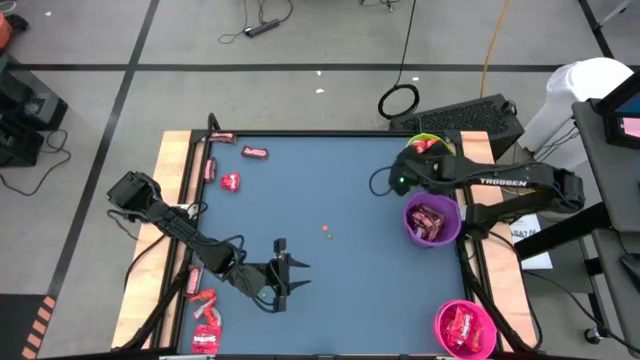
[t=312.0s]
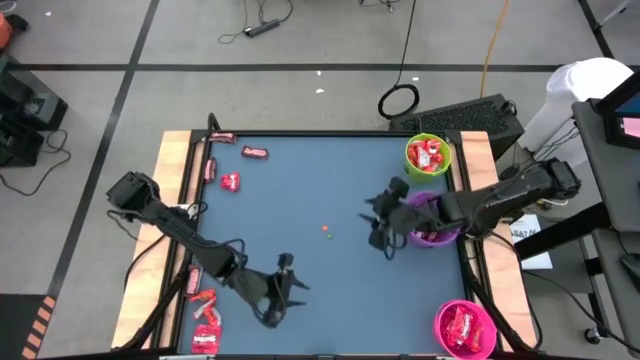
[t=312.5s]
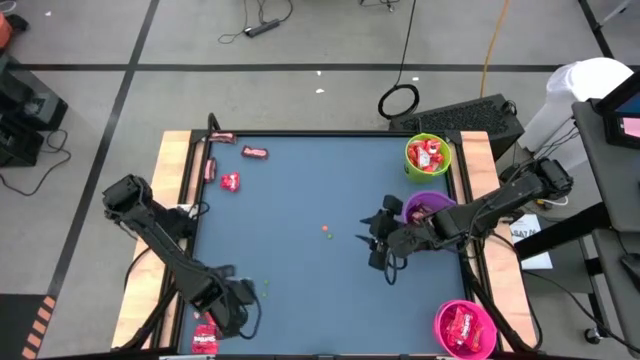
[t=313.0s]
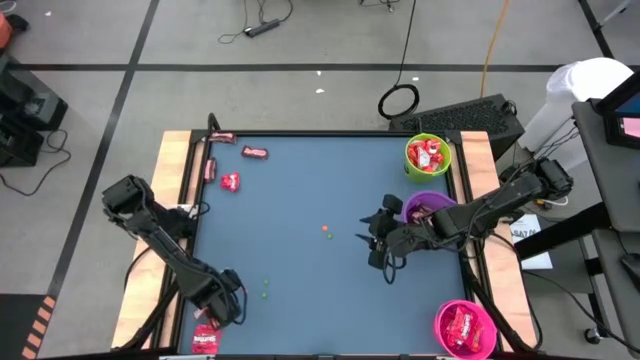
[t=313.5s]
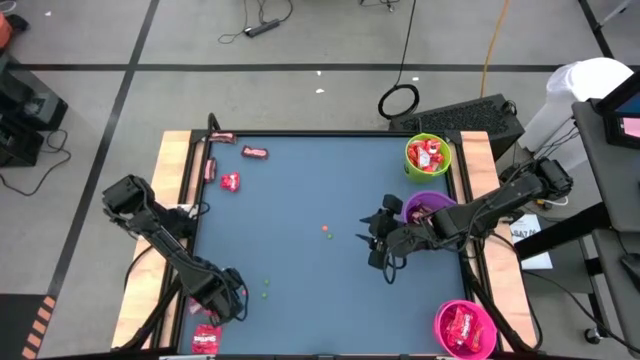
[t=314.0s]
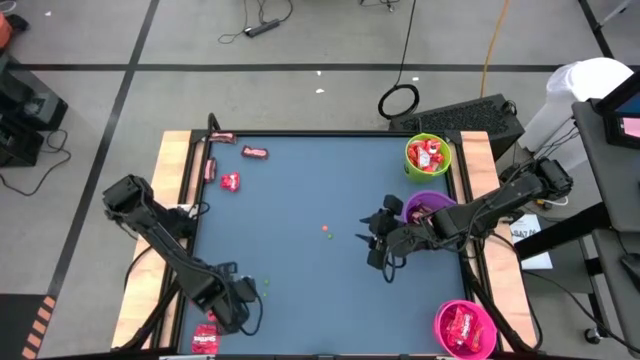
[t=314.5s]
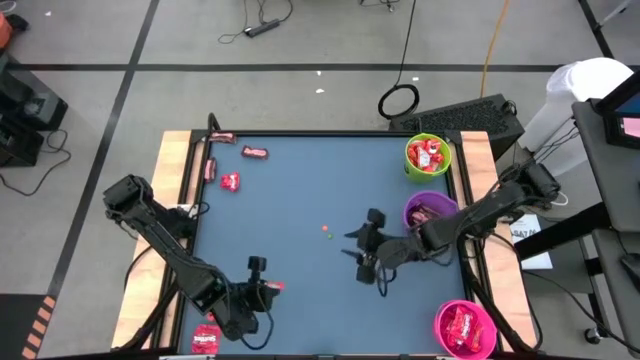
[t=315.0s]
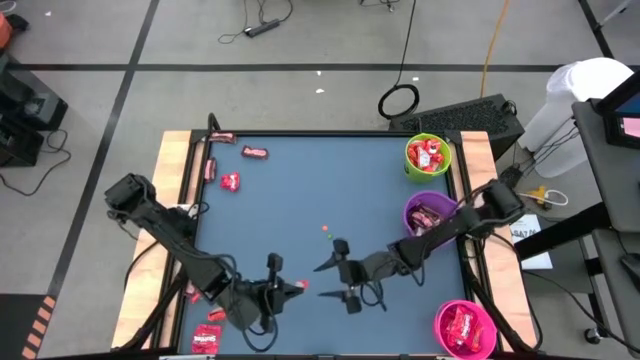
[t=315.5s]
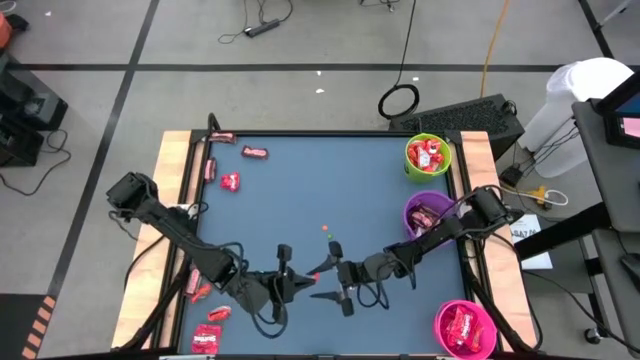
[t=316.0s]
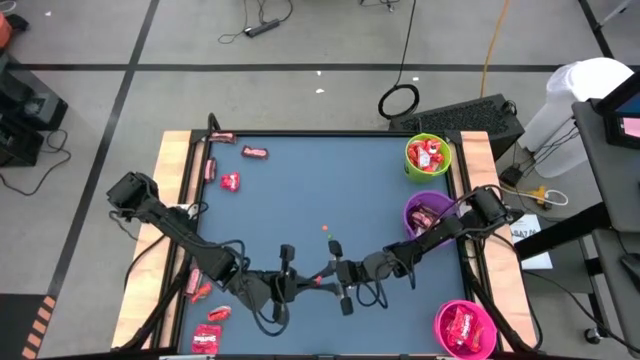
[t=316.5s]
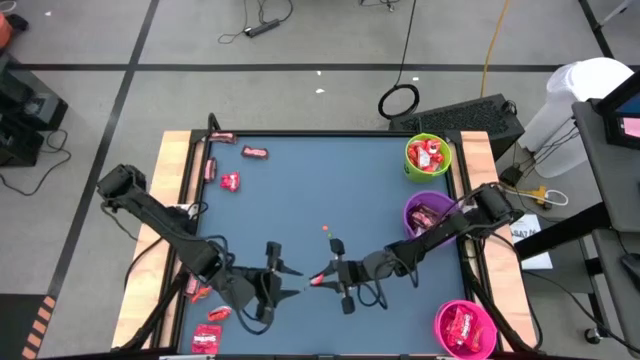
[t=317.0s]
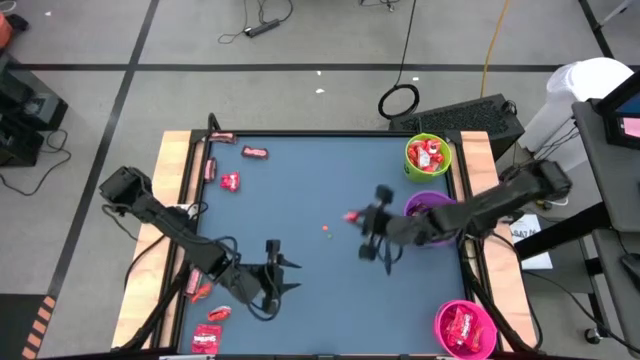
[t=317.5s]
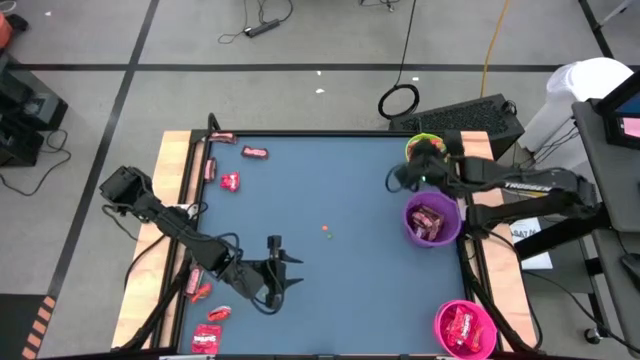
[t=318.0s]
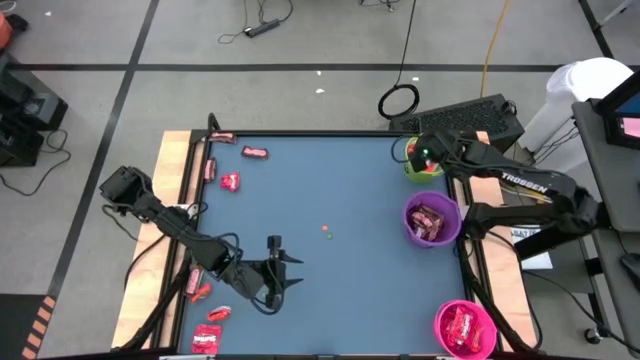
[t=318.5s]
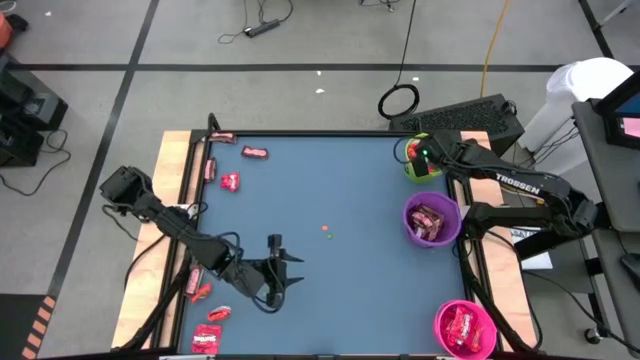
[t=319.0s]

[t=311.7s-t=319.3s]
Task: Organize candy in baskets
Put the orange chocolate bar into the green bucket

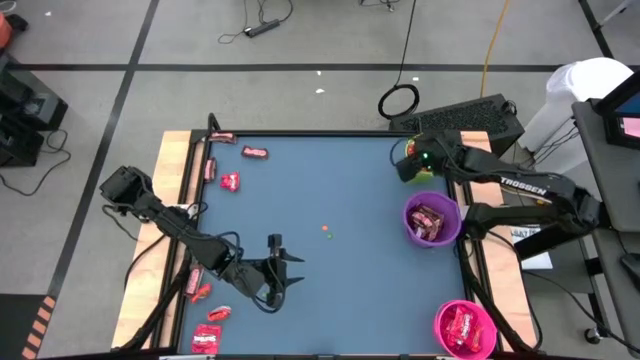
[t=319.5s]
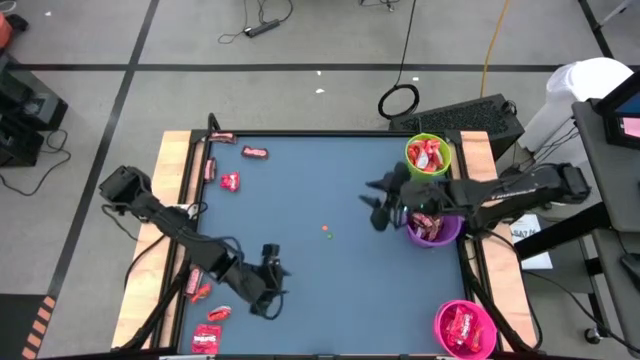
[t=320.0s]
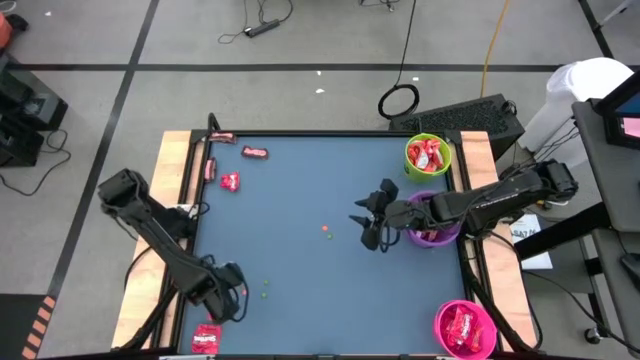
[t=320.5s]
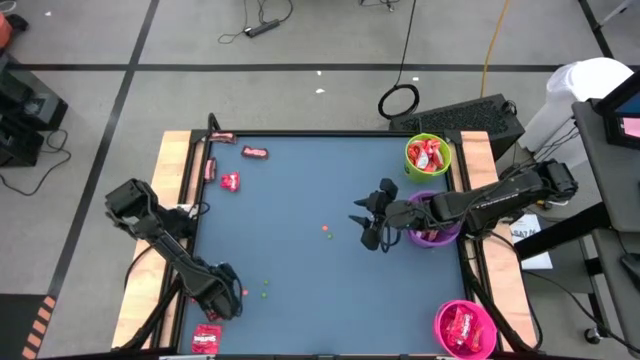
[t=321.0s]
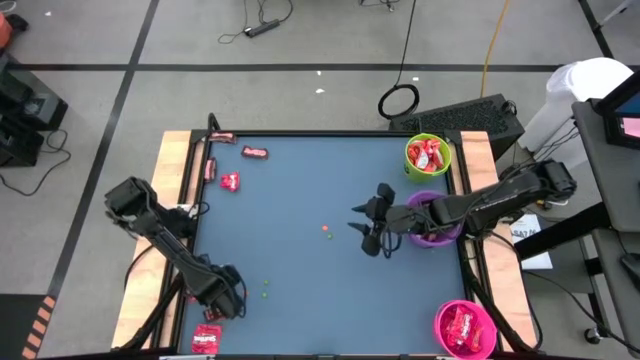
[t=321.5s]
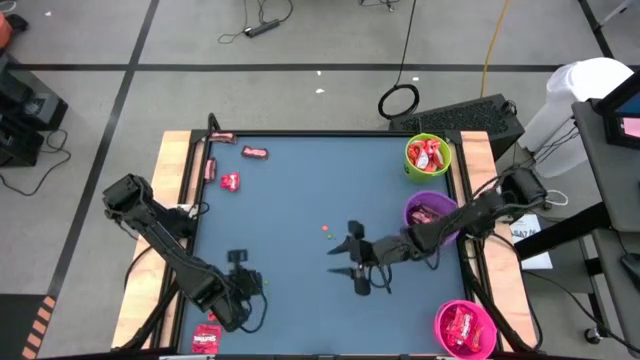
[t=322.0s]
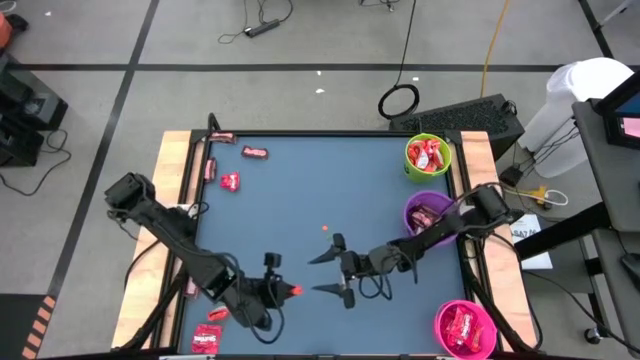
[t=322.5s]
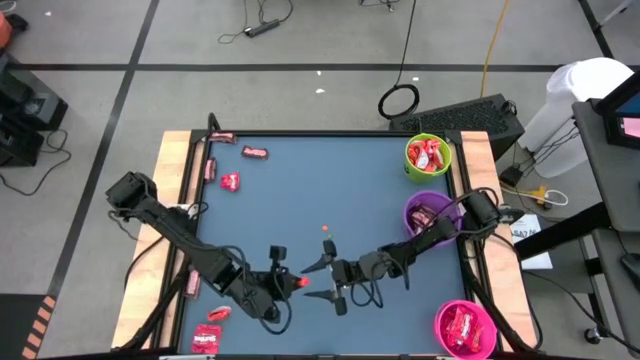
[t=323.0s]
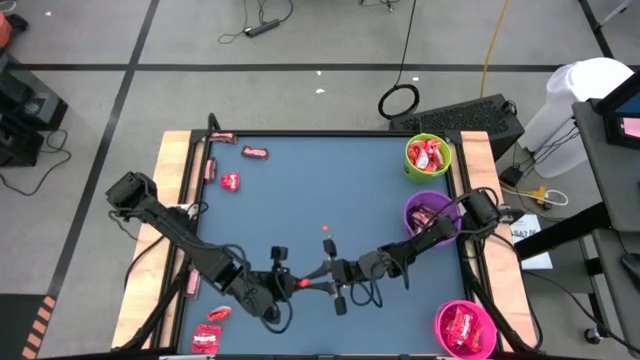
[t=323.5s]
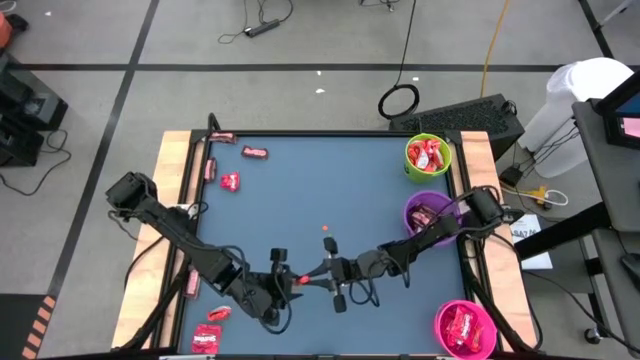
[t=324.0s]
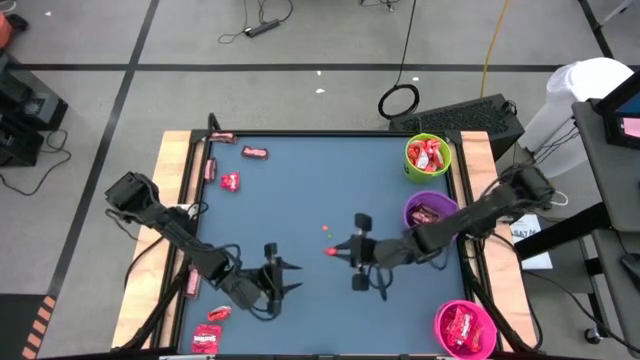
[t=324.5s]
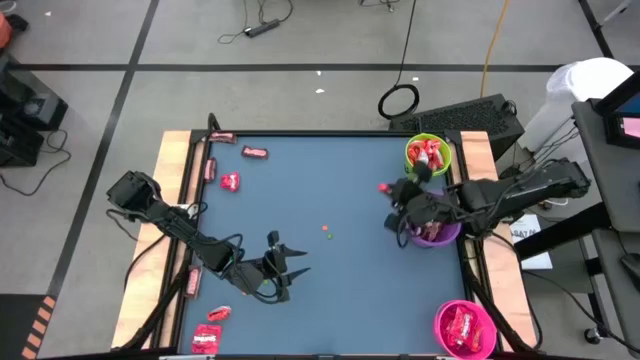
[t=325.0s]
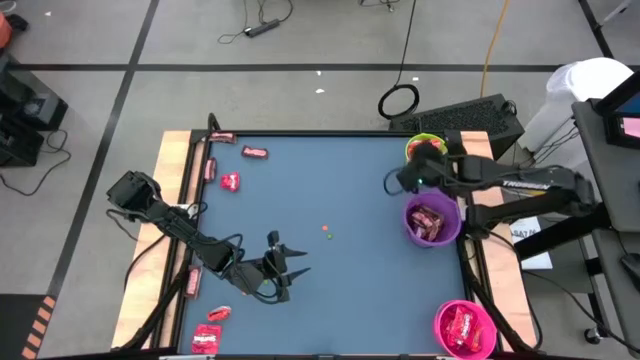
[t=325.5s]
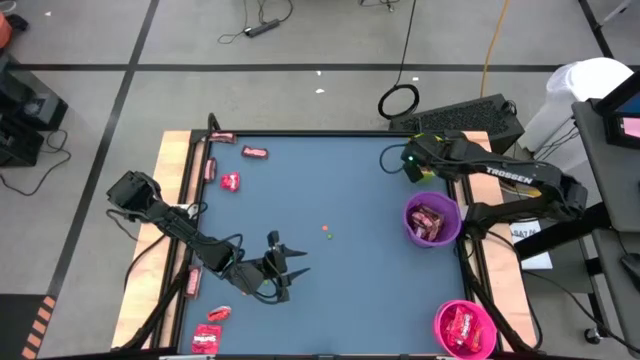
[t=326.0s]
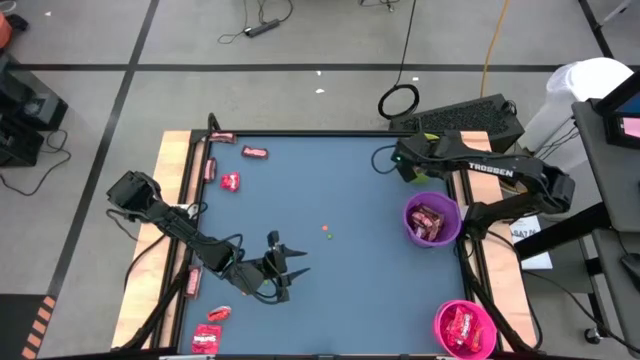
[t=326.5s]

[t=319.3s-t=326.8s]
Put the orange chocolate bar into the green bucket

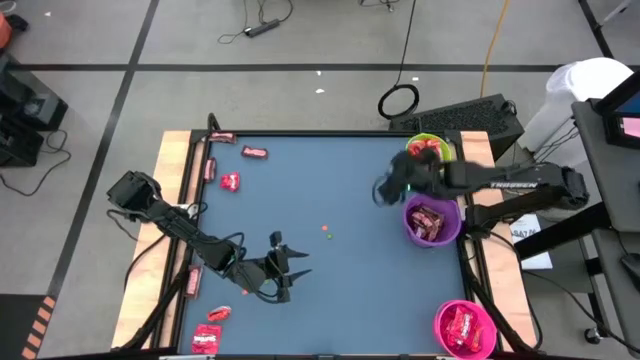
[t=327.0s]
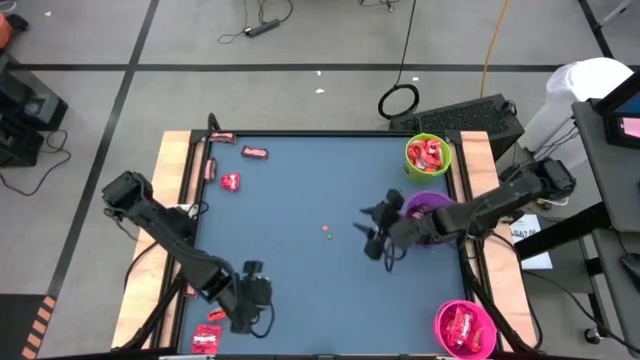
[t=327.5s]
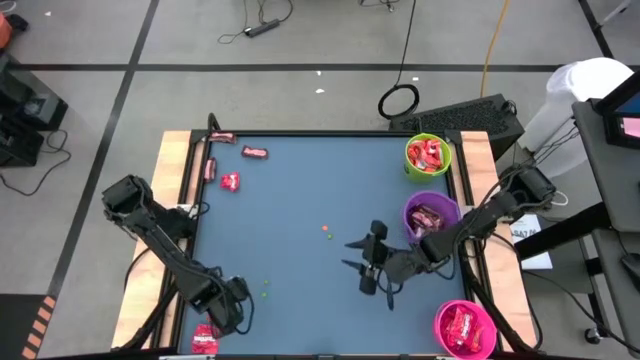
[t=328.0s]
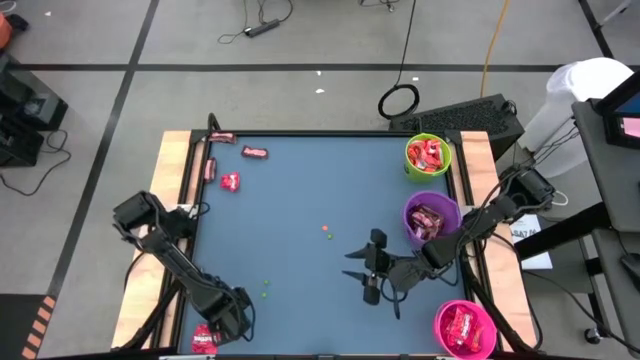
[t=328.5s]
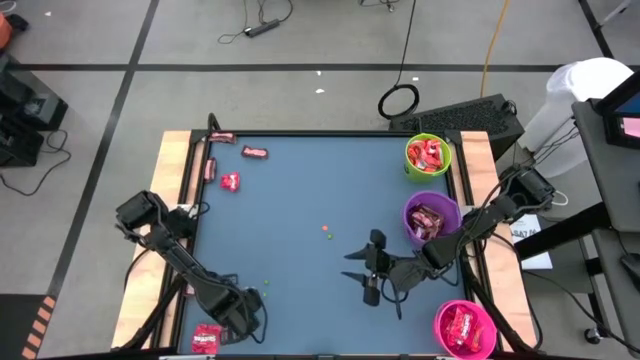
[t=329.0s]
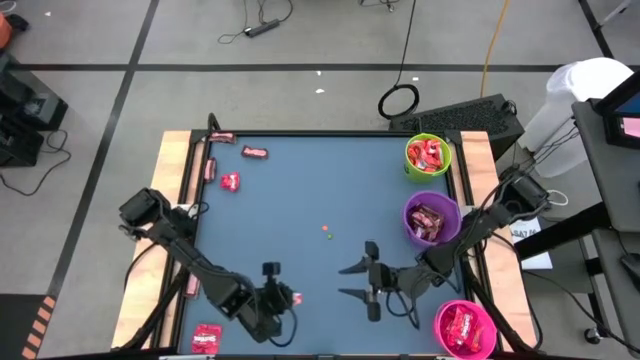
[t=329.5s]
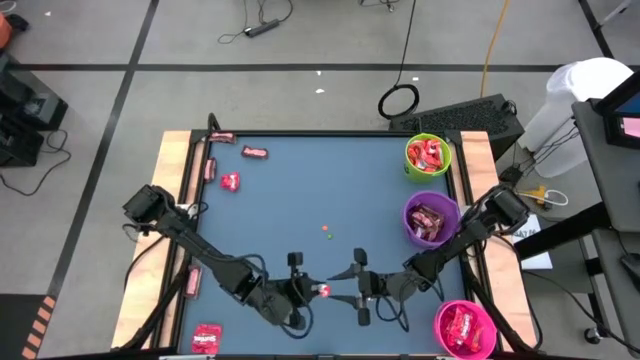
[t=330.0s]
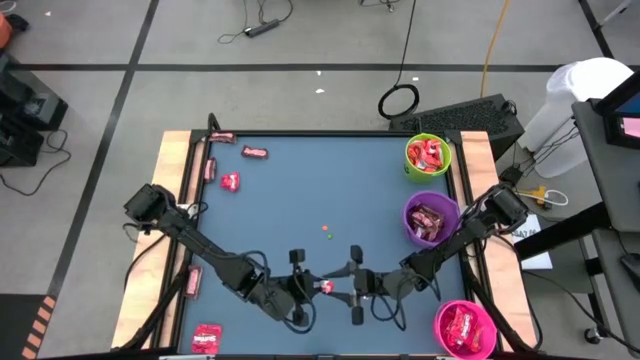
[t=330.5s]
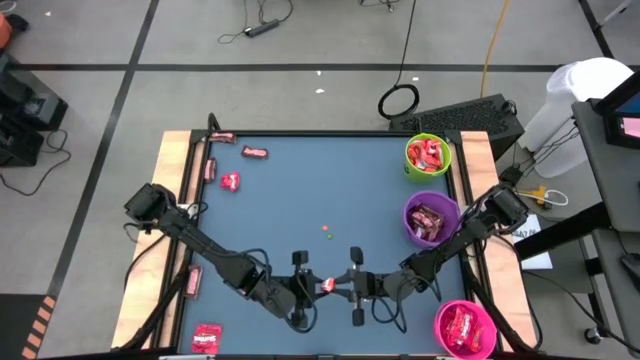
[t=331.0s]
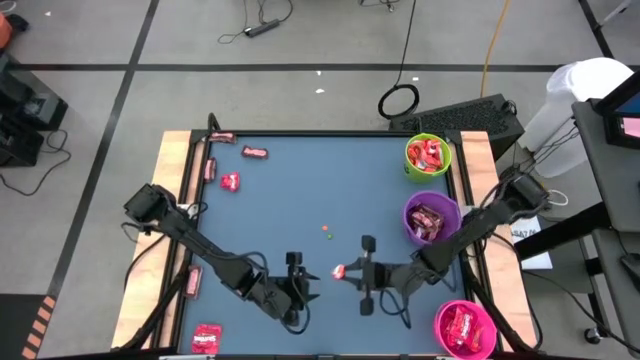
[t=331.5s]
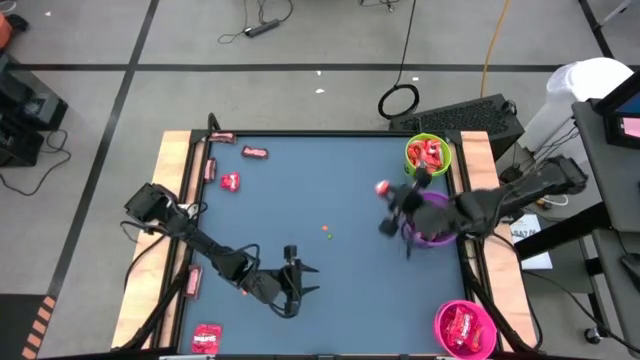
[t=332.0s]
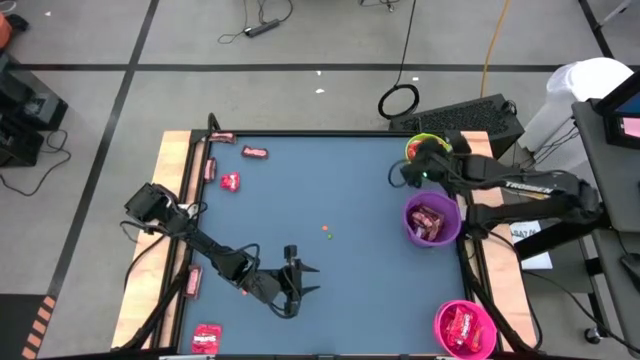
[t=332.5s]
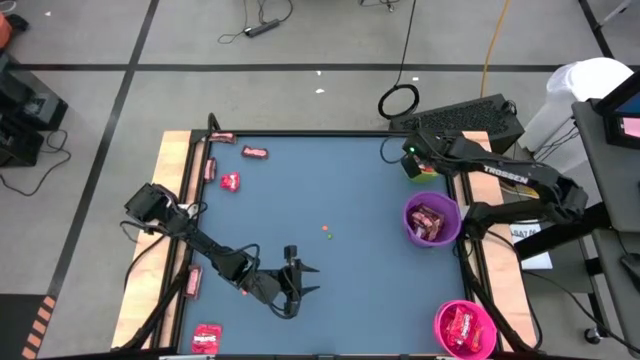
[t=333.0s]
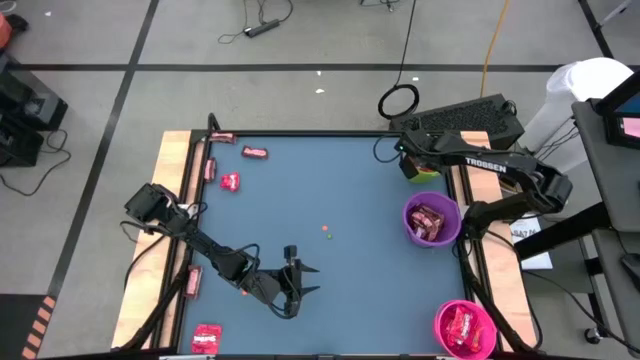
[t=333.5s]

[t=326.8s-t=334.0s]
Put the orange chocolate bar into the green bucket
